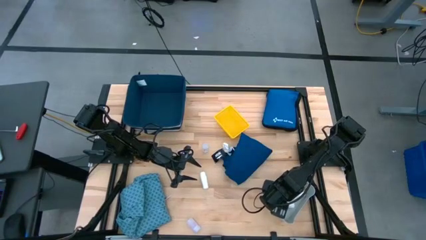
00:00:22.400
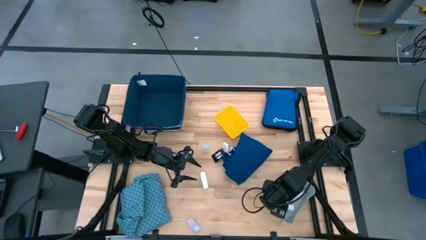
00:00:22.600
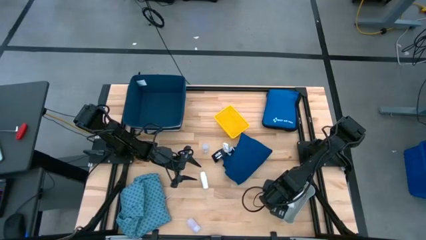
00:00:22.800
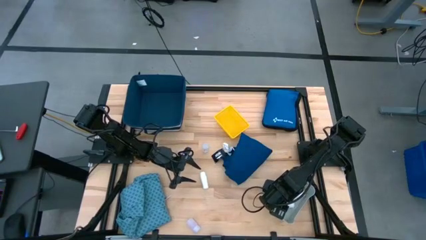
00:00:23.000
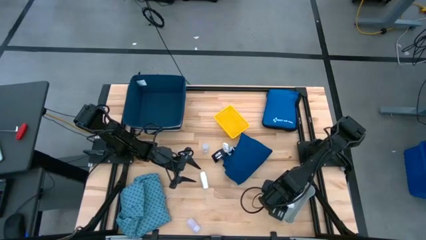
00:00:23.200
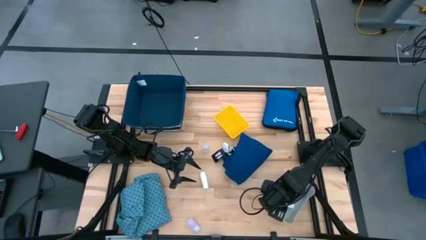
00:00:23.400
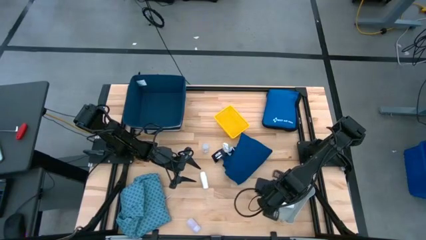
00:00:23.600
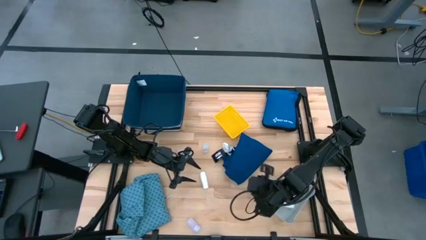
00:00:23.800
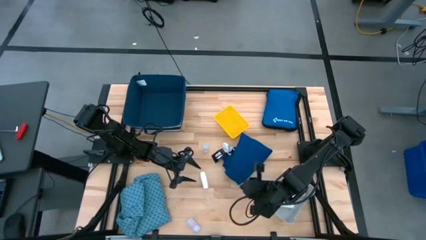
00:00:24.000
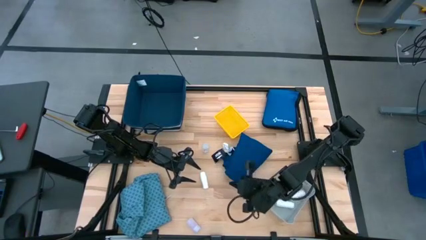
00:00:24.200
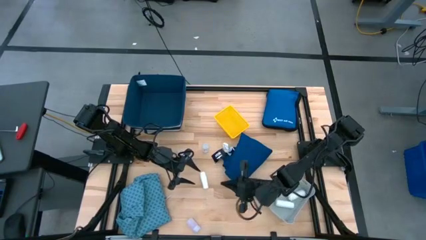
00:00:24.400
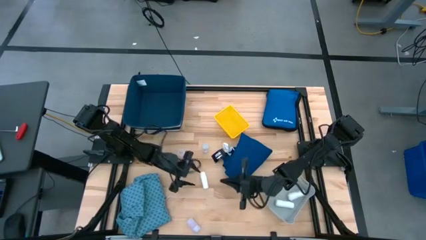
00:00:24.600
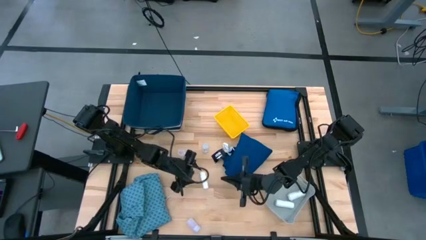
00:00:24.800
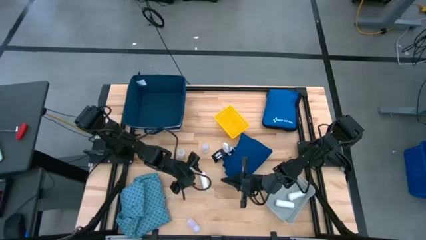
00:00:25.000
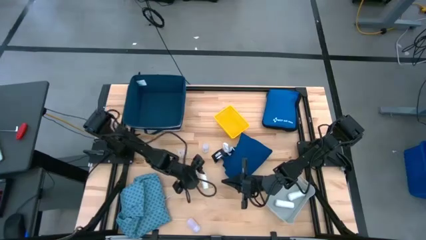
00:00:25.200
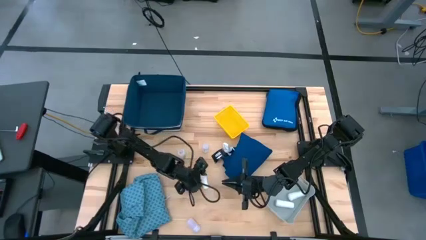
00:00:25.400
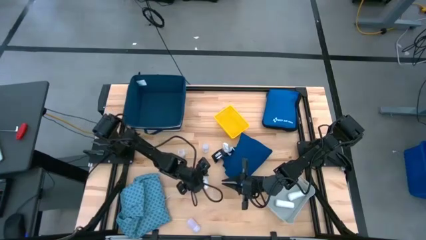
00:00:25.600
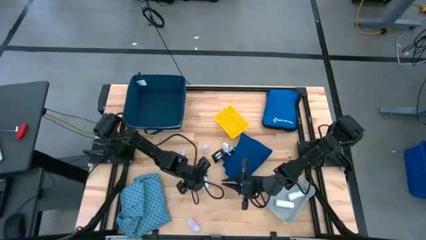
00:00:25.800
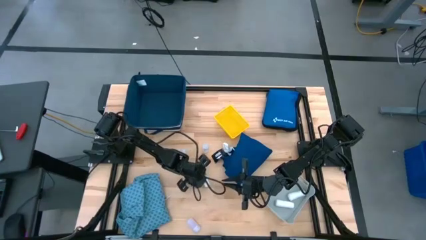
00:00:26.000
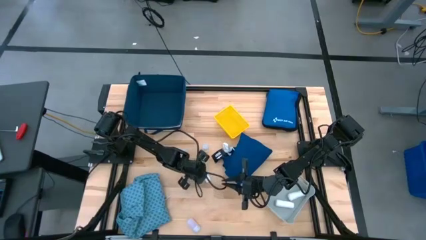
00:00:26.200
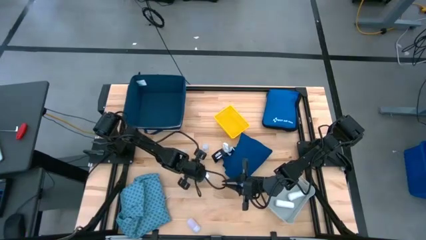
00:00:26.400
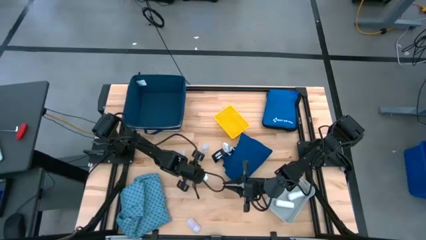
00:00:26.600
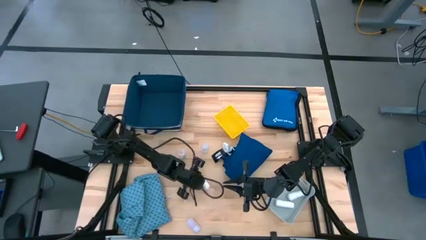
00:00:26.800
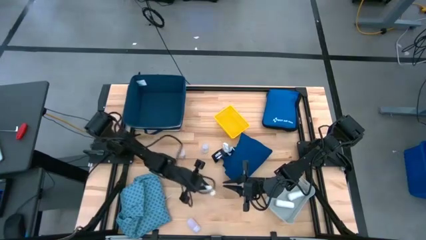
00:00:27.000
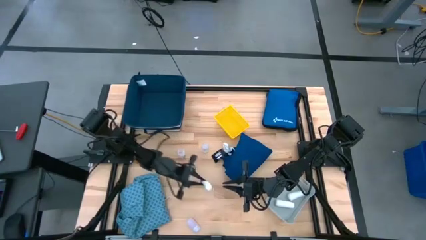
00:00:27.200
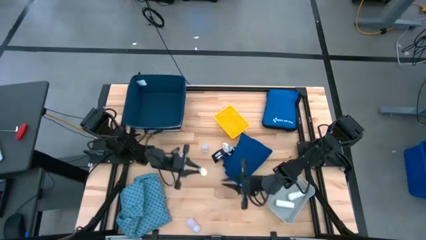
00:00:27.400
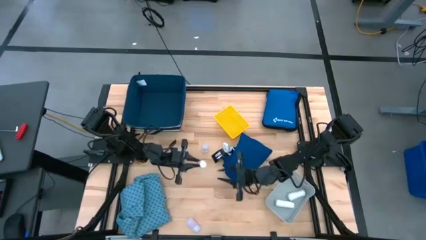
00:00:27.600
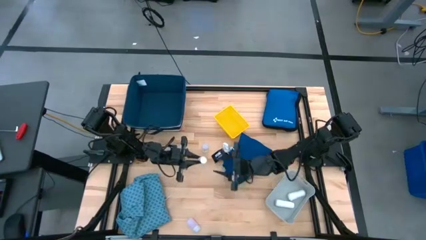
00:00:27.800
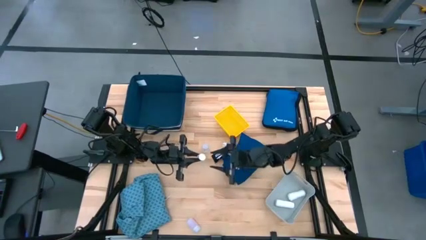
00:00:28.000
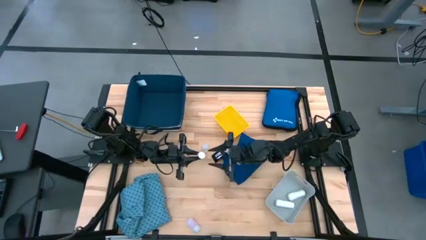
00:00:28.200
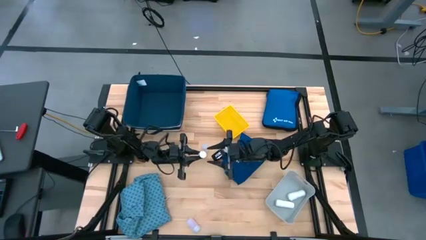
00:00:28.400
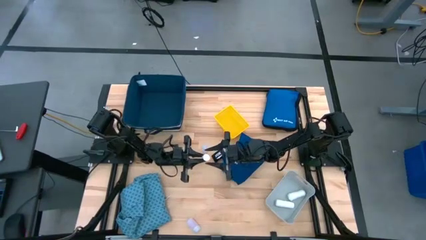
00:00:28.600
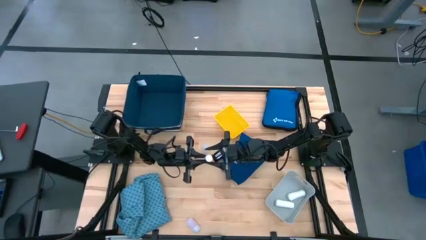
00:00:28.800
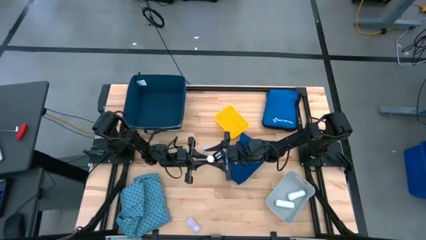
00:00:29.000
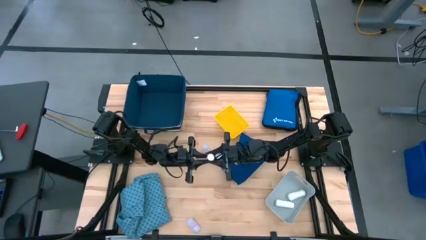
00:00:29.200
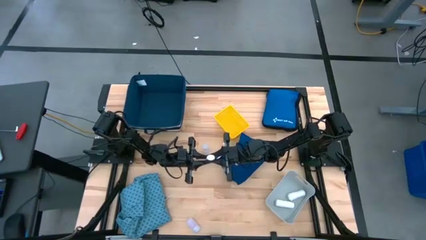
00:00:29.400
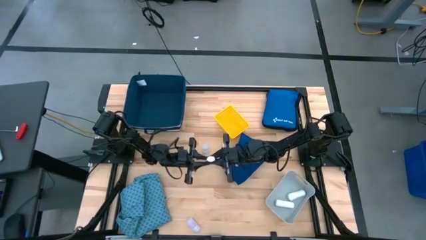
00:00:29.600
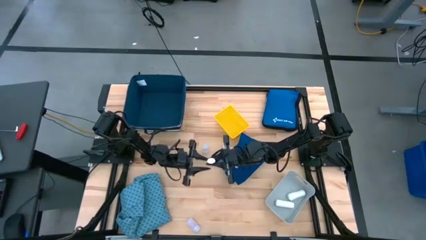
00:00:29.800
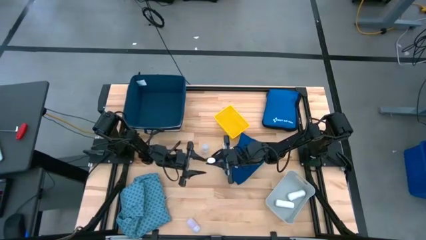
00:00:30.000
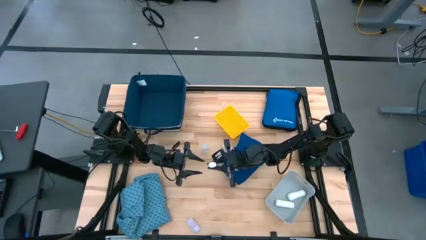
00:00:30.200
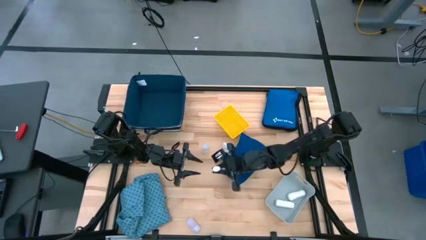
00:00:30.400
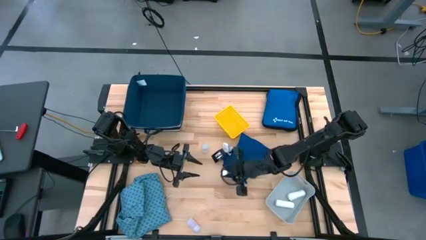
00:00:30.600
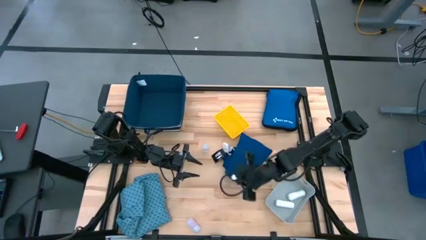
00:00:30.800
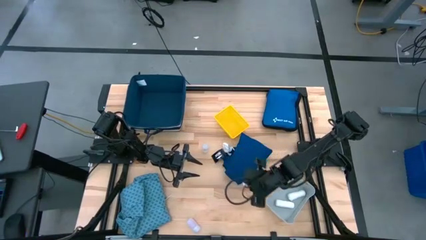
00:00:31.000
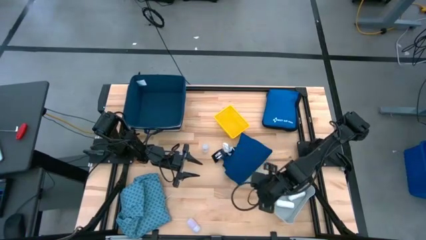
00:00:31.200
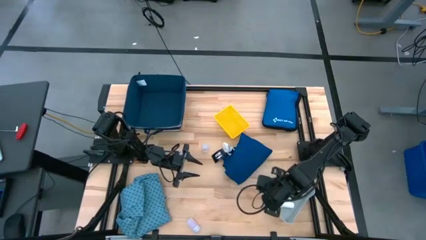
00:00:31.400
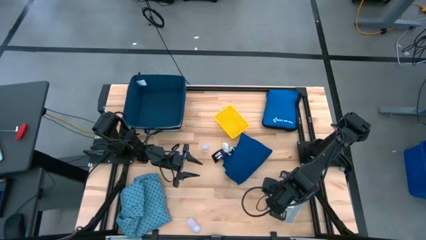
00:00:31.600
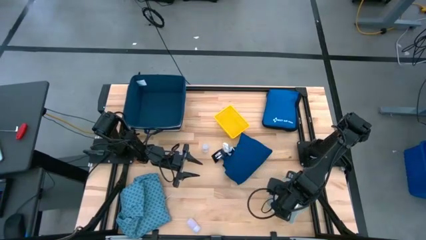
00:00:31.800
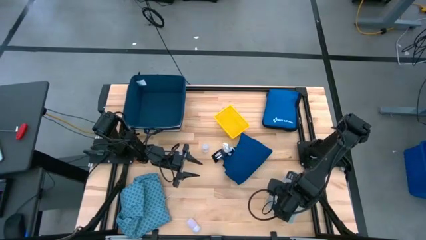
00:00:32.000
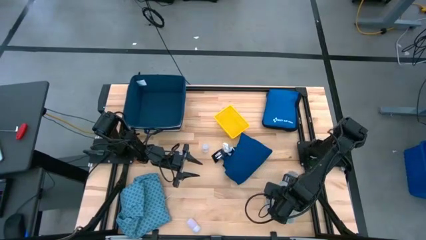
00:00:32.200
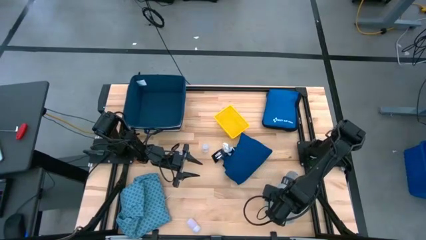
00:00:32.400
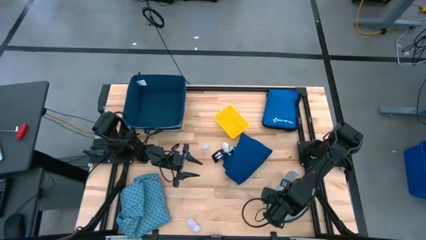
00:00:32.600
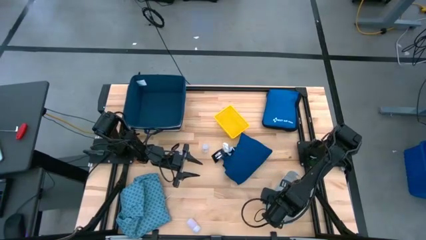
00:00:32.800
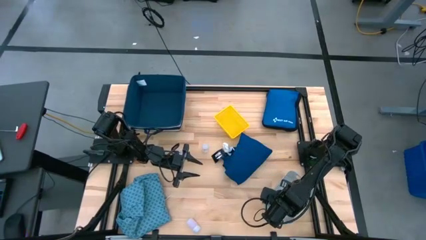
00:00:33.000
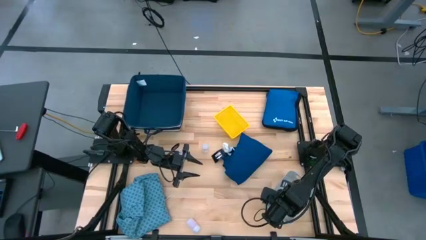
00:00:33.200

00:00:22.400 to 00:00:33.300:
Task: Pick & place medical supplies in basket/bin
Put the white rolled gauze into the gray bin
